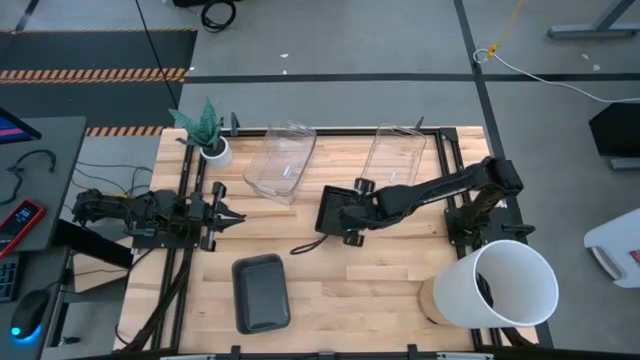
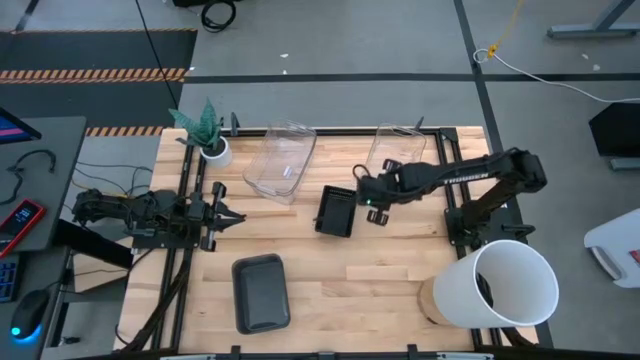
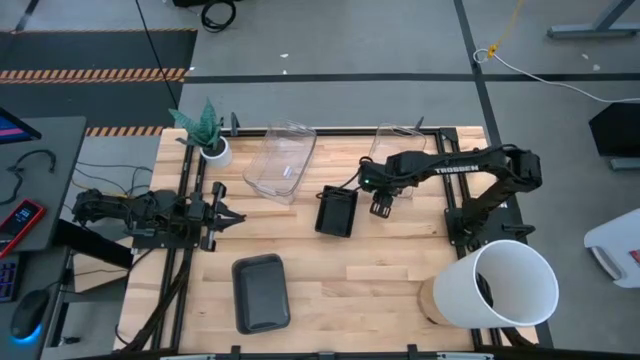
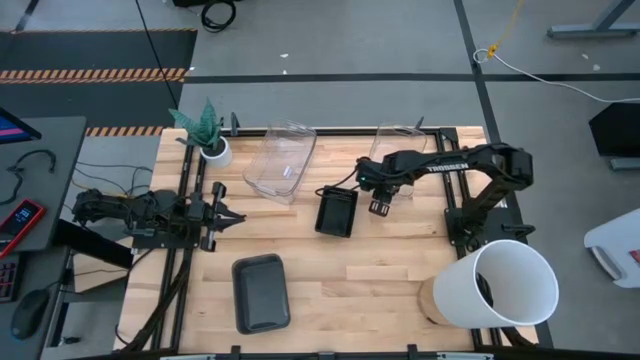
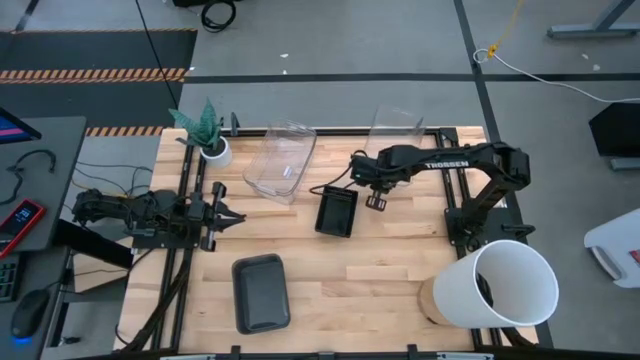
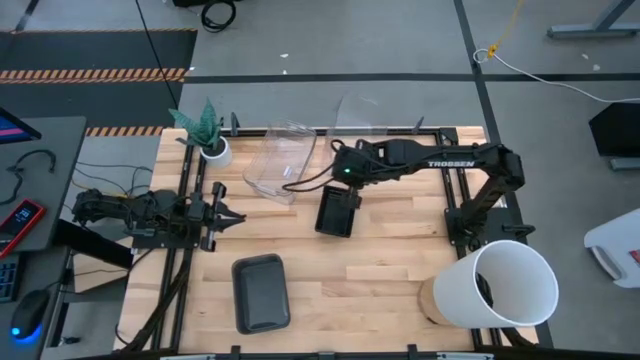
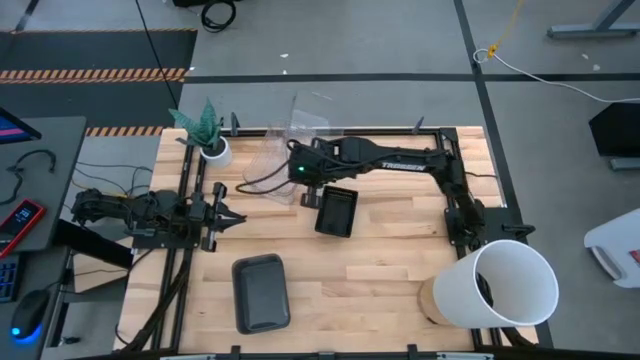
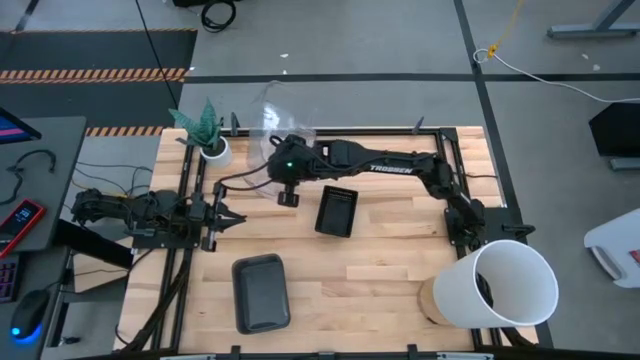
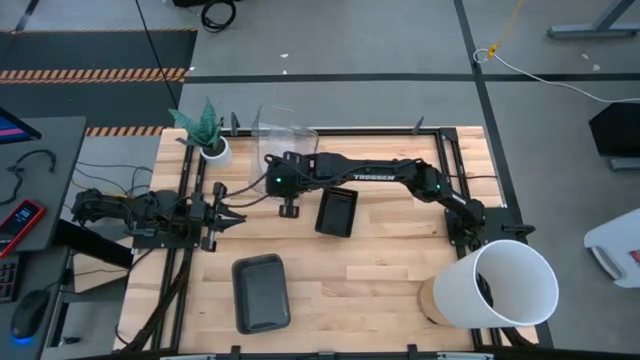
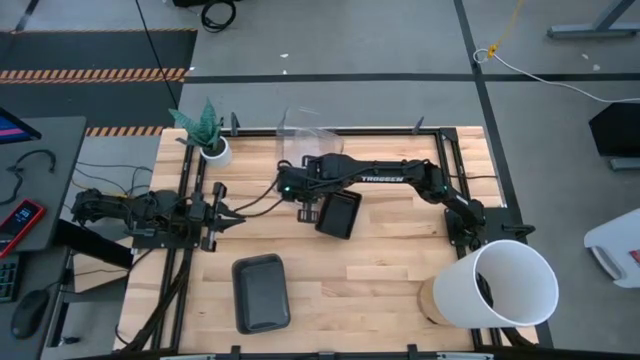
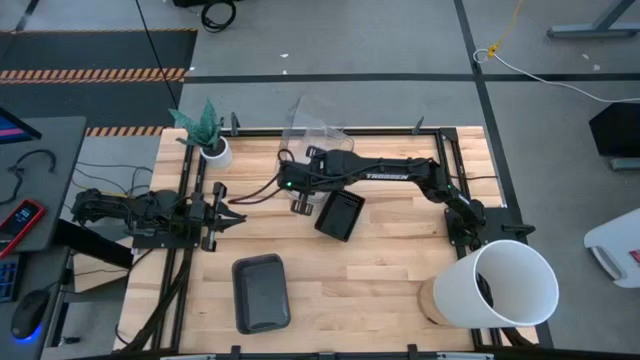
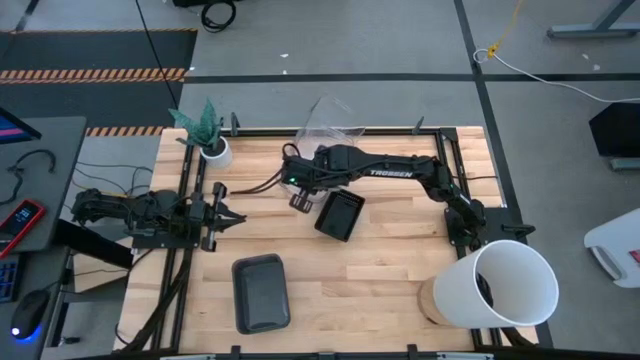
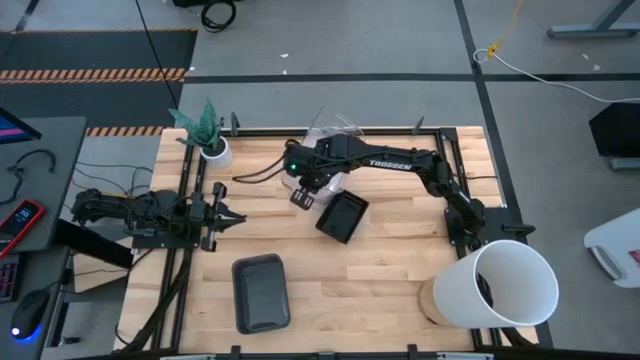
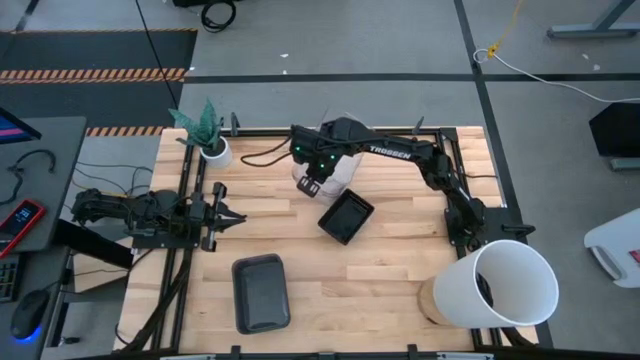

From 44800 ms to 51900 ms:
Stack the right transparent bin on top of the left transparent bins

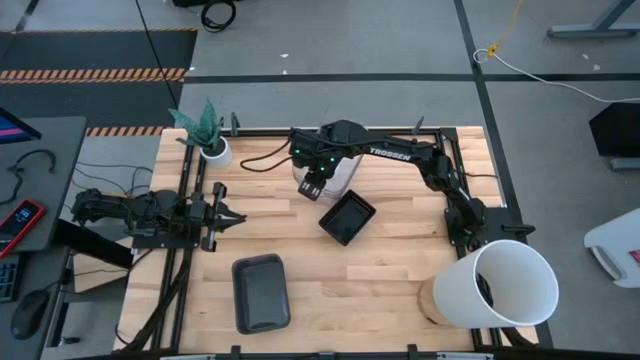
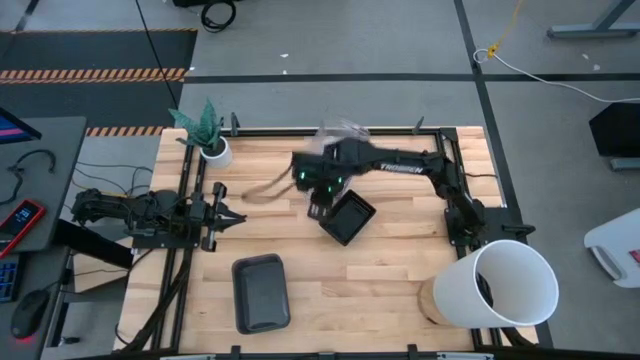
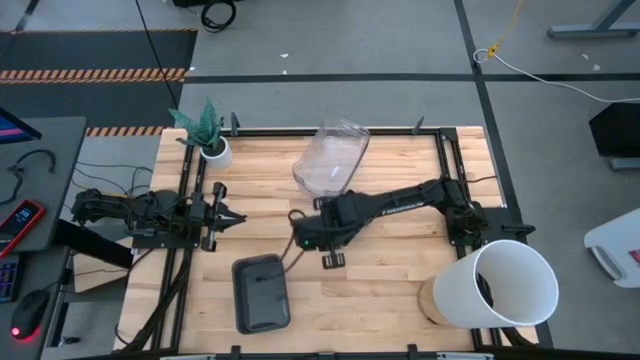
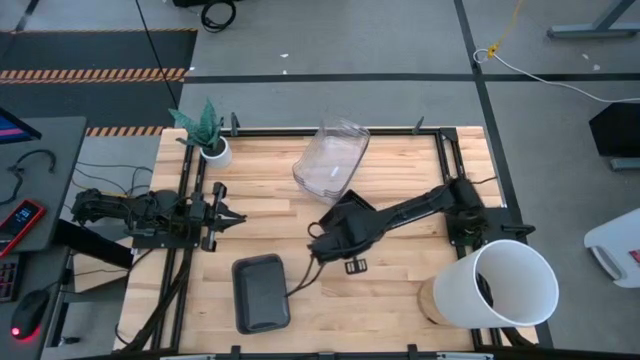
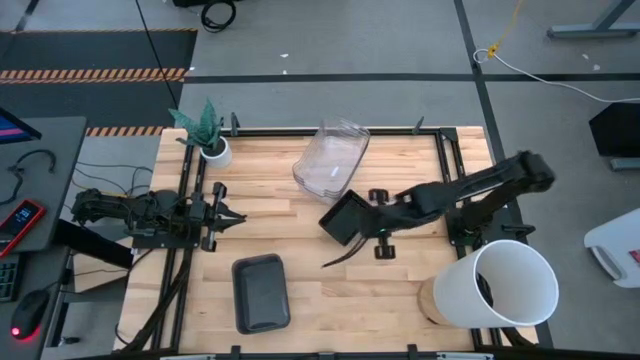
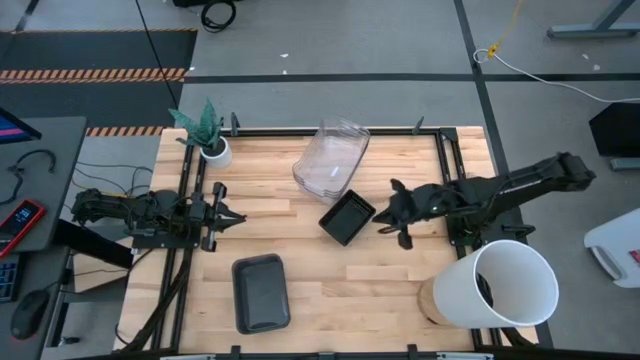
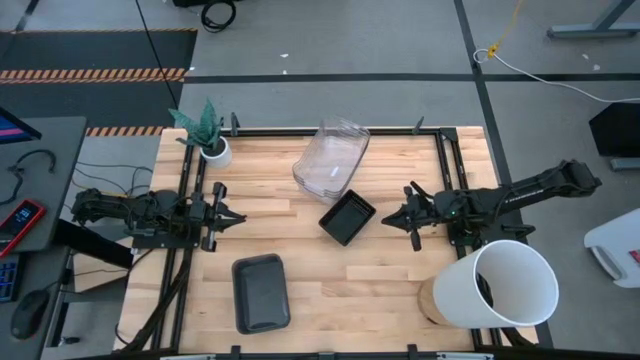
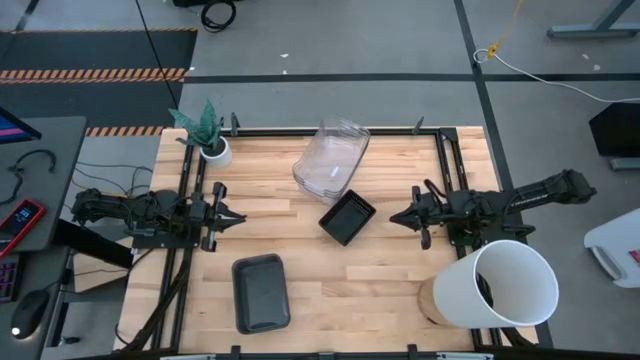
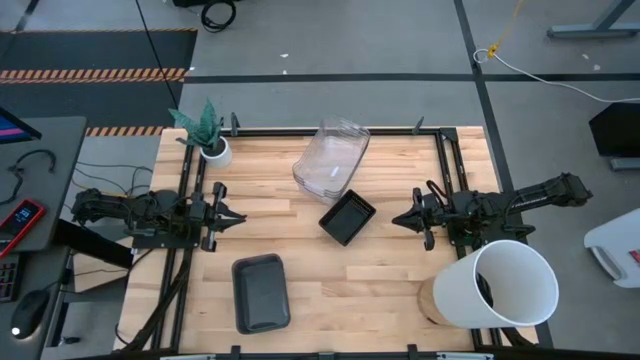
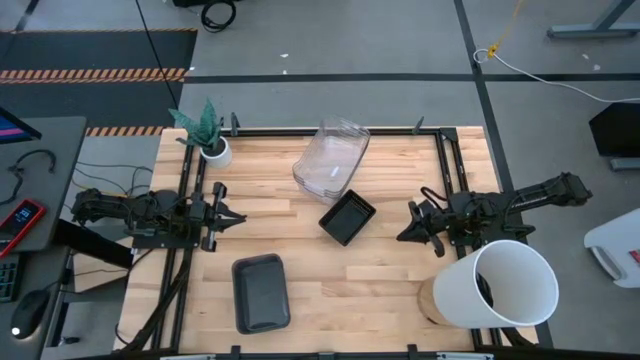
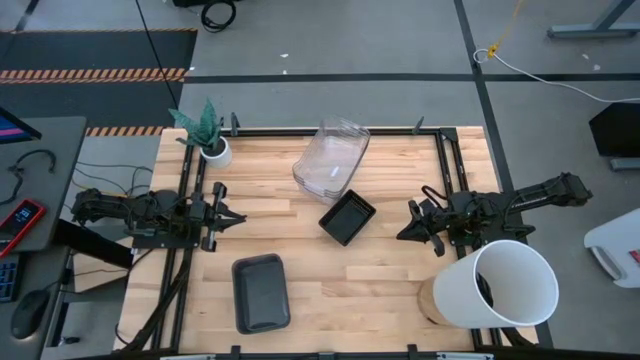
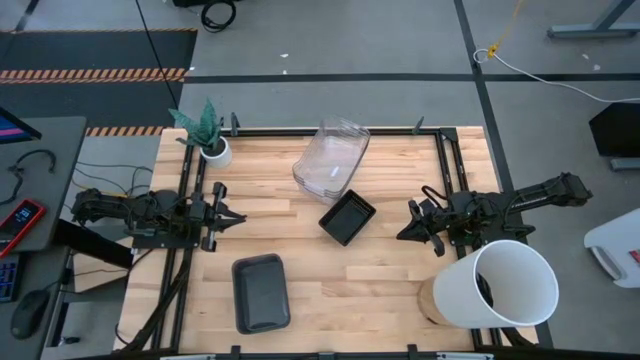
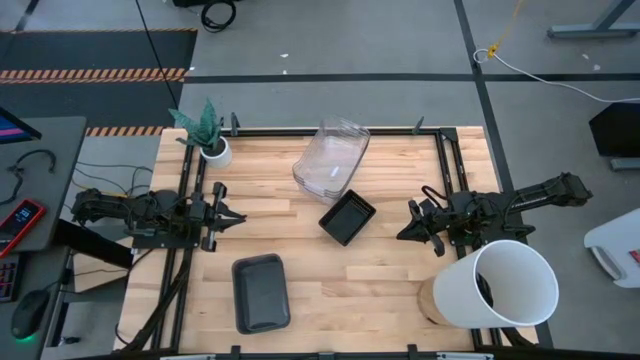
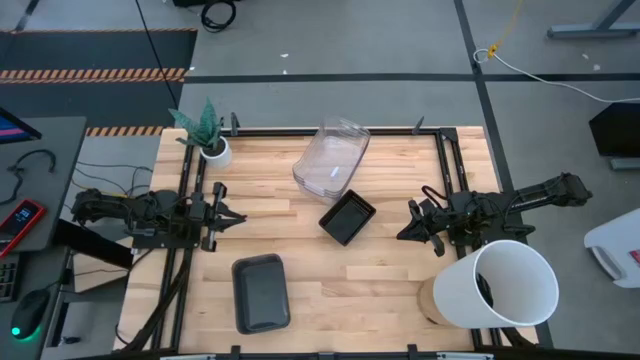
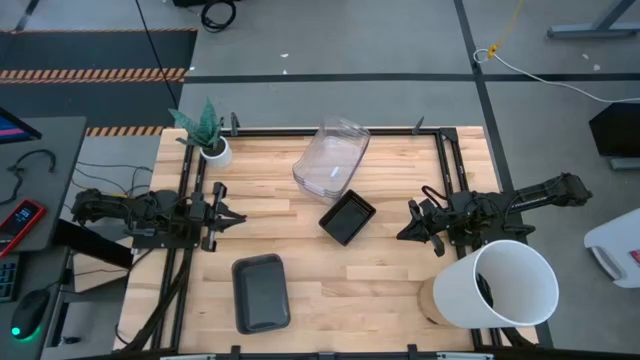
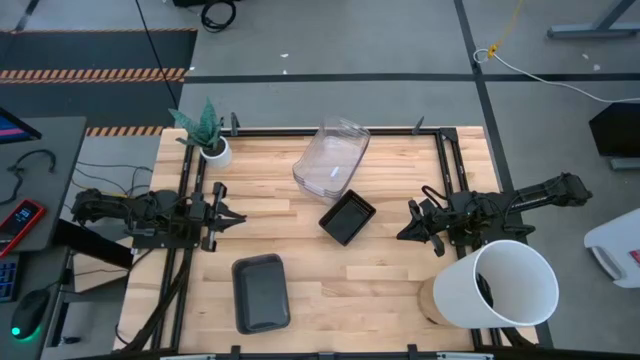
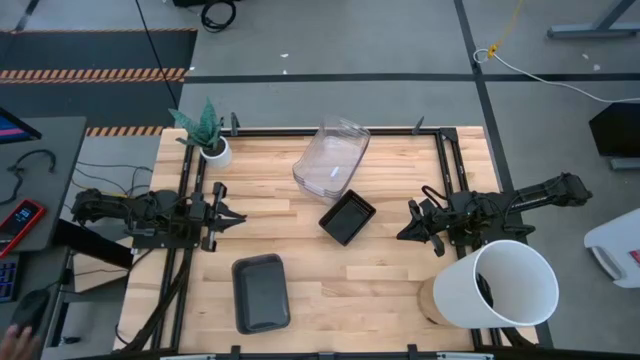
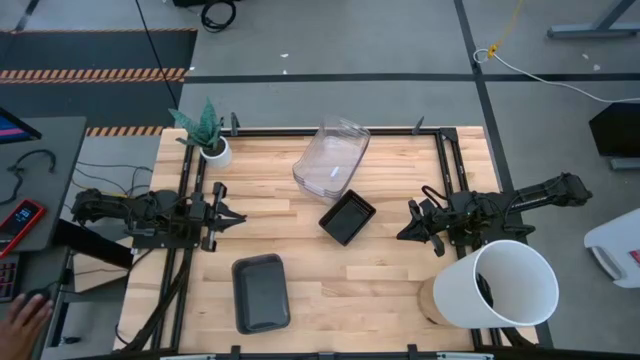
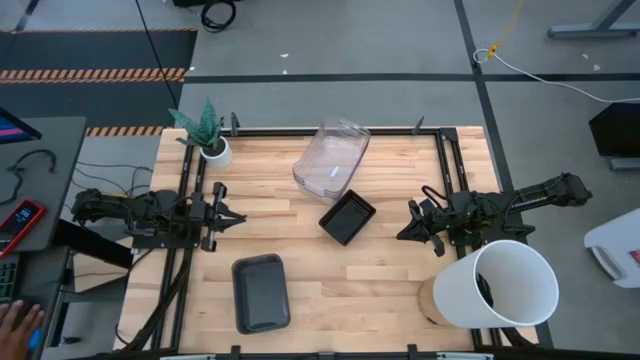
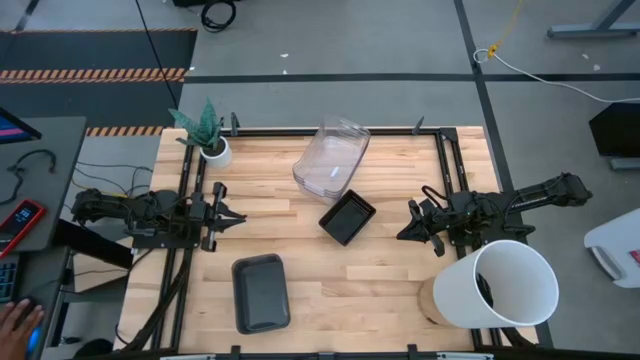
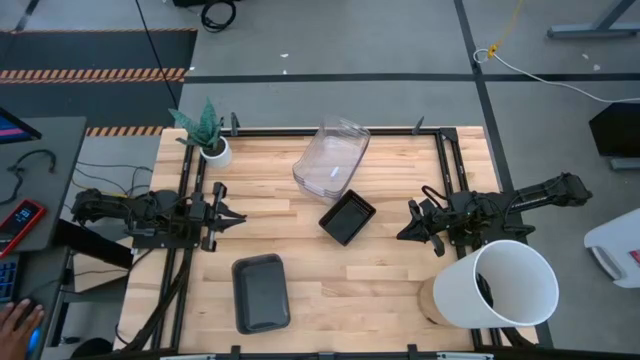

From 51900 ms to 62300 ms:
Return to Home Position
